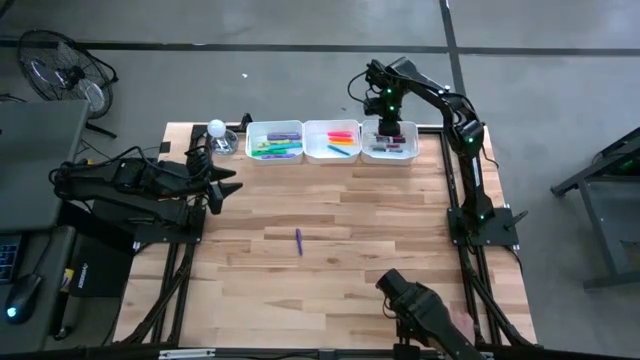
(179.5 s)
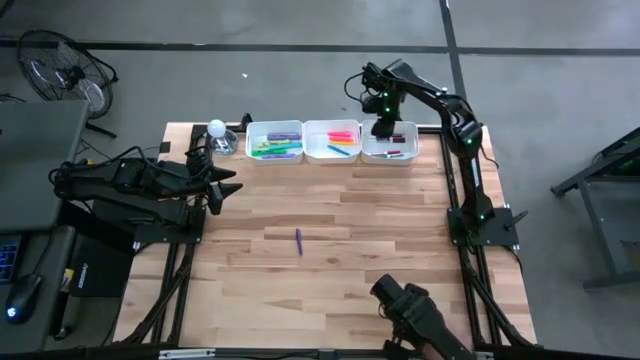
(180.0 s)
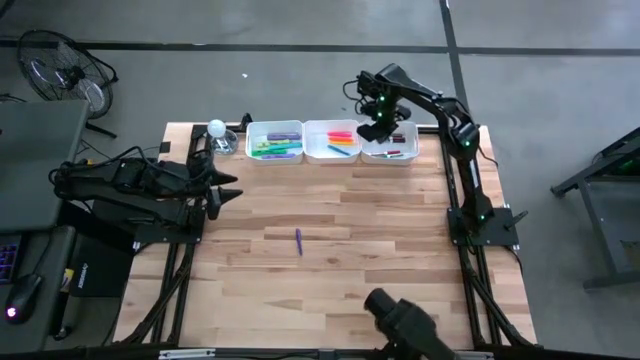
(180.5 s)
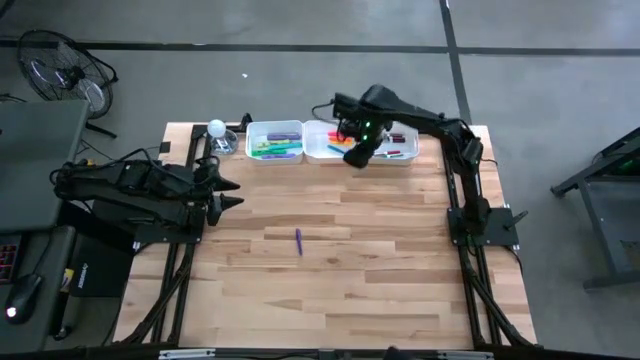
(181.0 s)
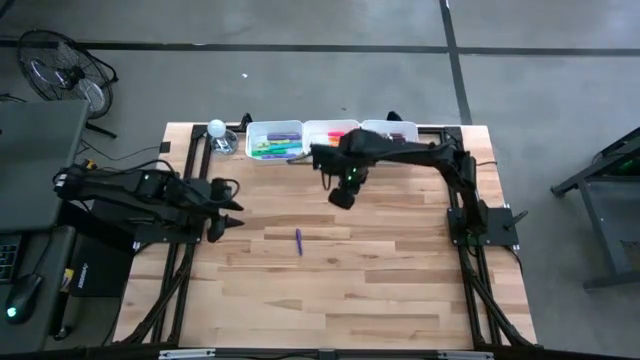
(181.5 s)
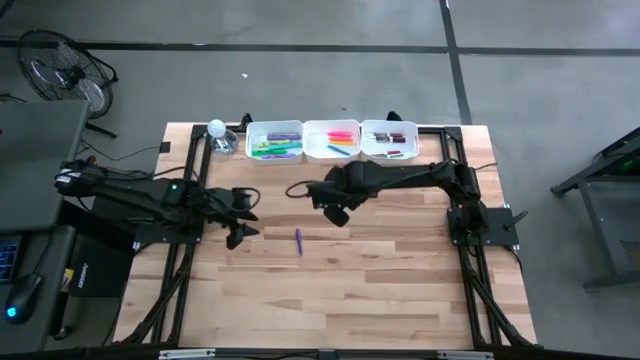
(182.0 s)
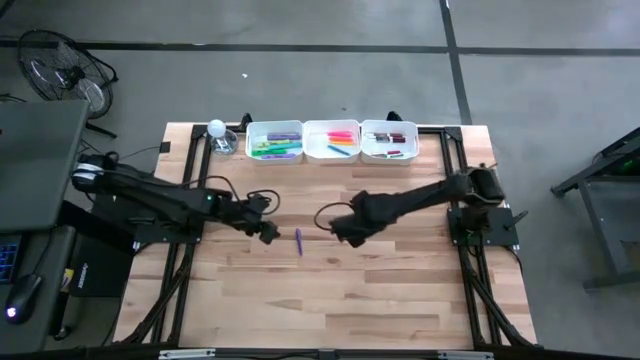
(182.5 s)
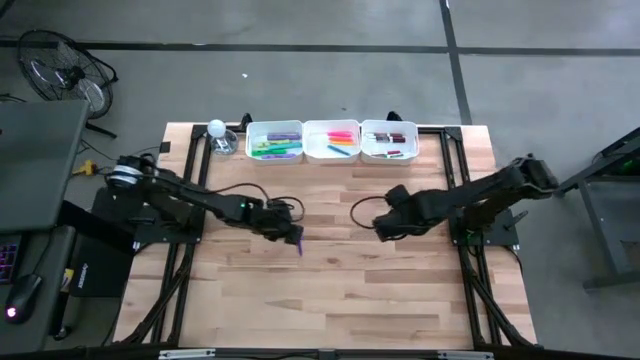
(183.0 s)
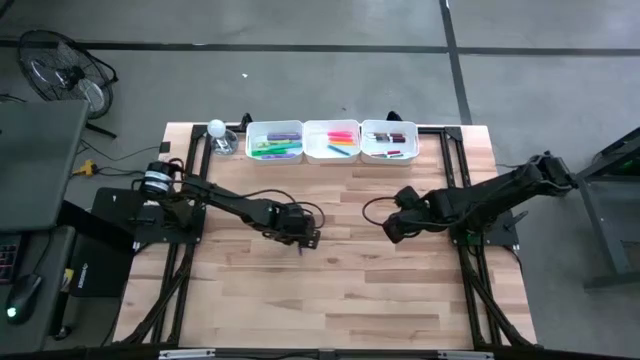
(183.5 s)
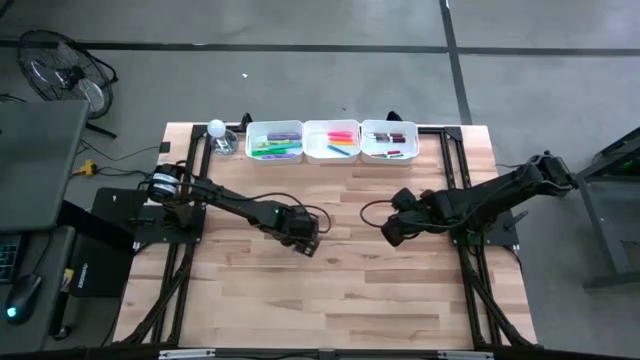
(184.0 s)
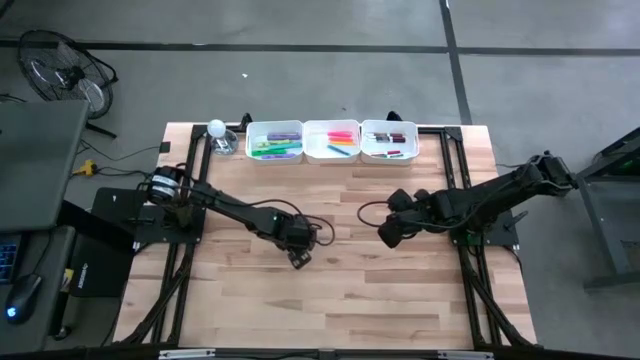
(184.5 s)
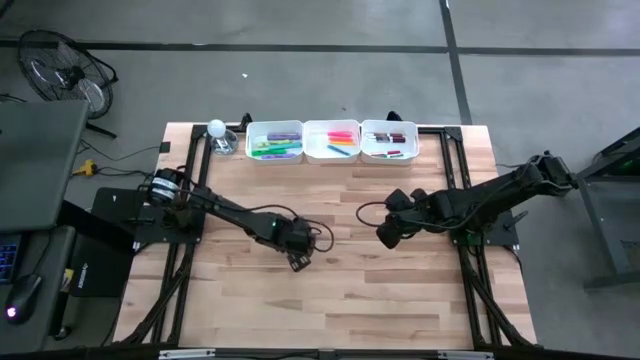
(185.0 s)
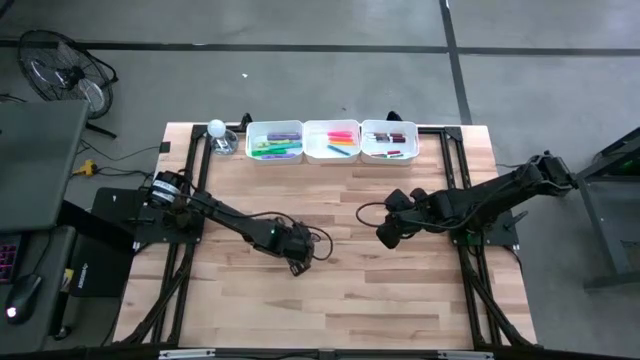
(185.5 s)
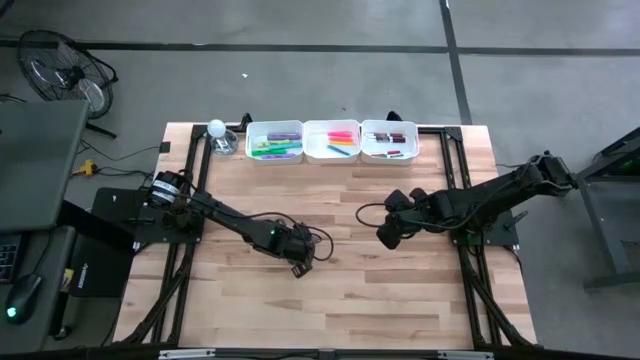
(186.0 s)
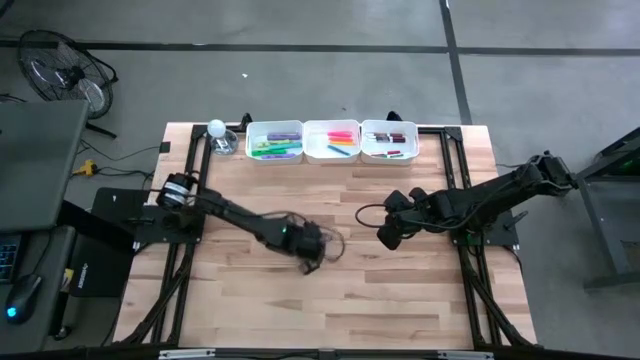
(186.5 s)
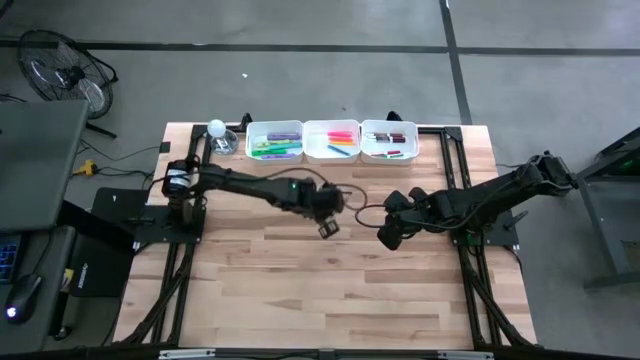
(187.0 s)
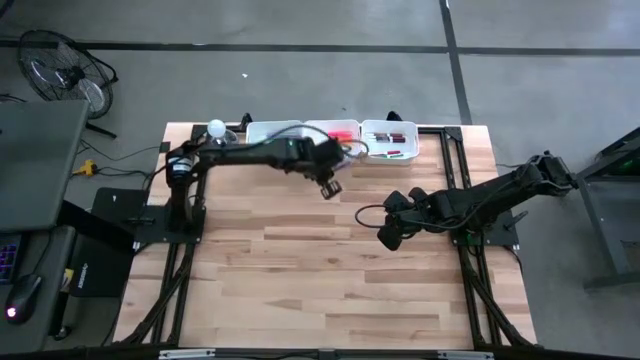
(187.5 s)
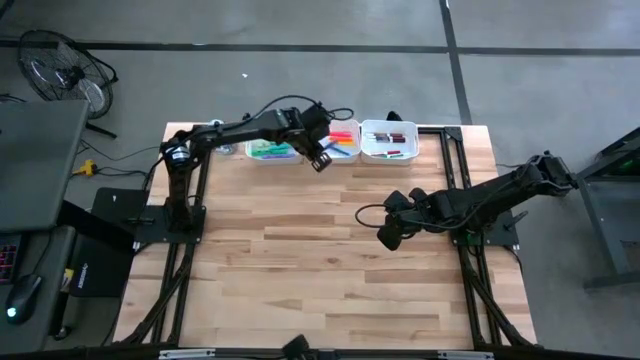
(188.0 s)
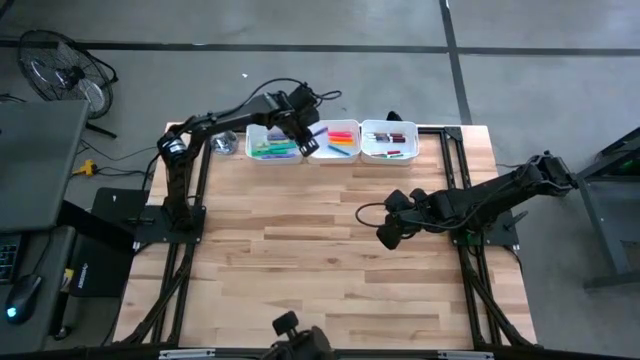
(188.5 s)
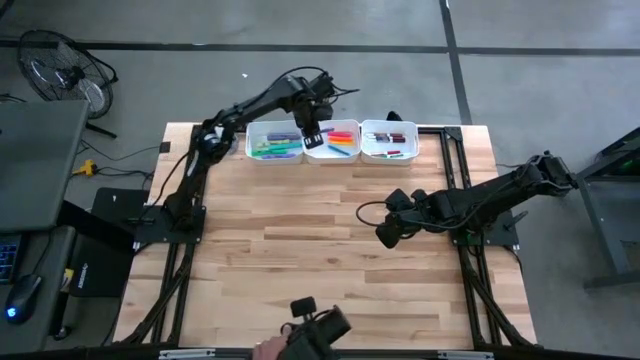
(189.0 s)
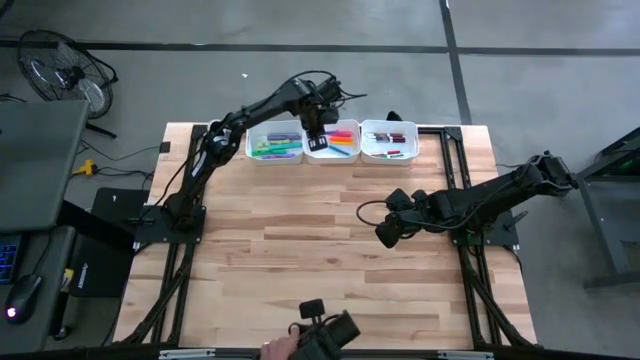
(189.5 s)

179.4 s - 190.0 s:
Task: Pick & Place Markers
Put the violet pen into the middle white bin

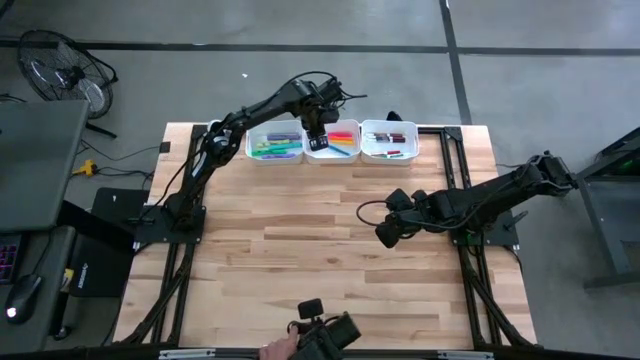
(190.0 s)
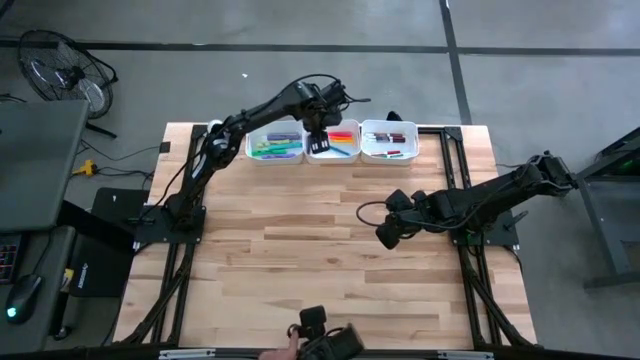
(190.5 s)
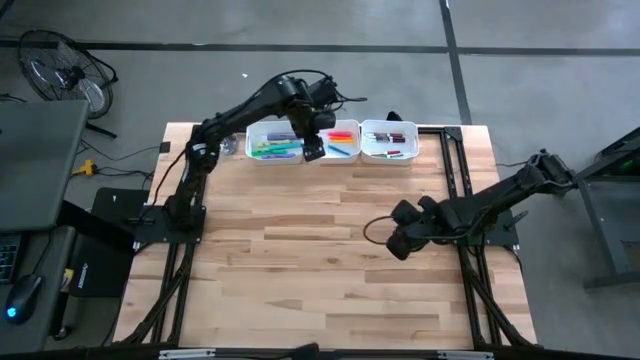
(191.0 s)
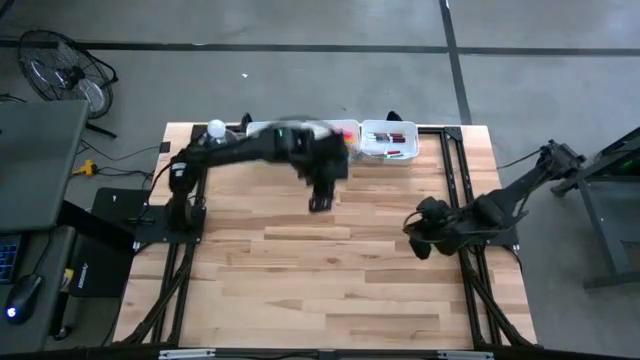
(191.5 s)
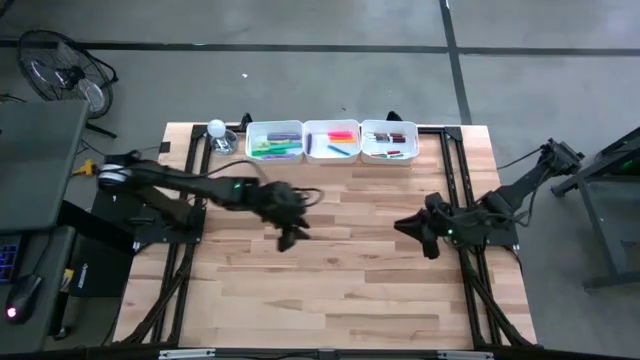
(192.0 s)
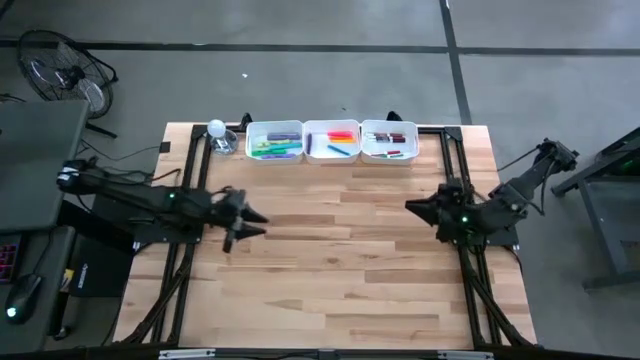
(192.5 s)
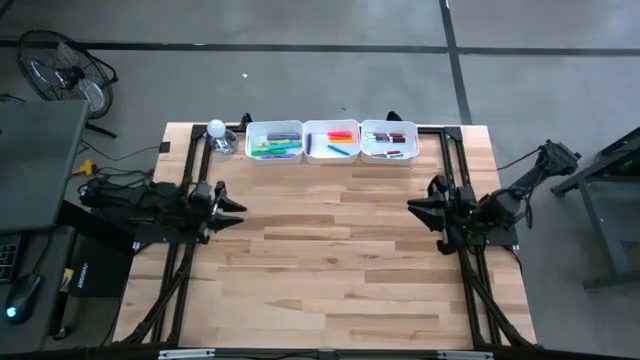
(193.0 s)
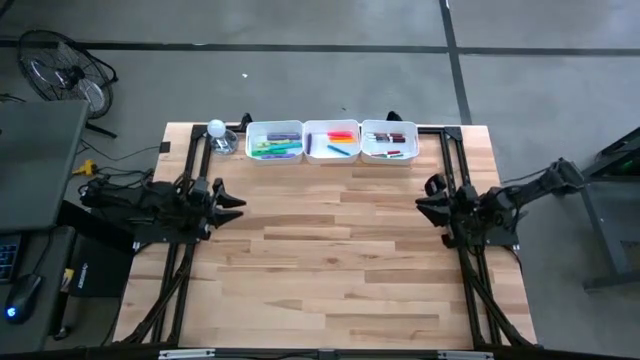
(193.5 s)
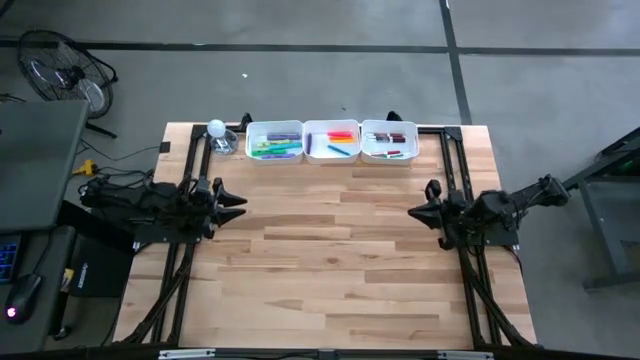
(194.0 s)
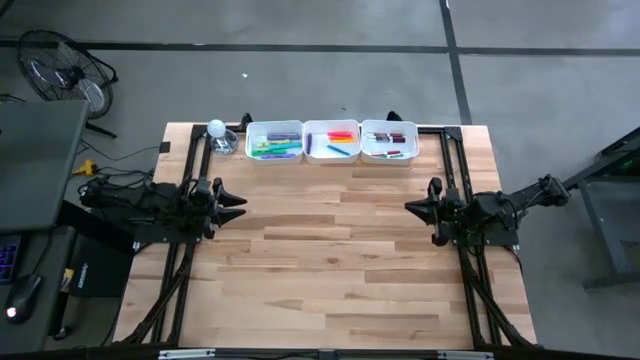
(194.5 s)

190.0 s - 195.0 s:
Return to Home Position

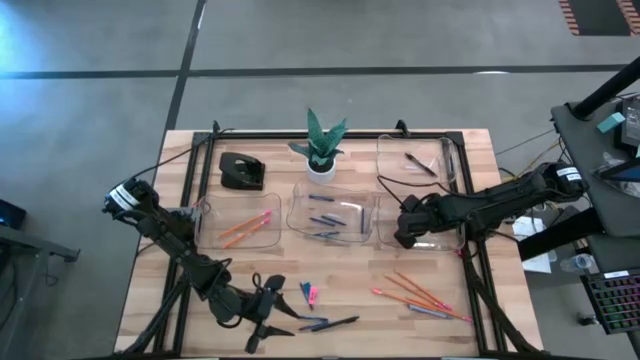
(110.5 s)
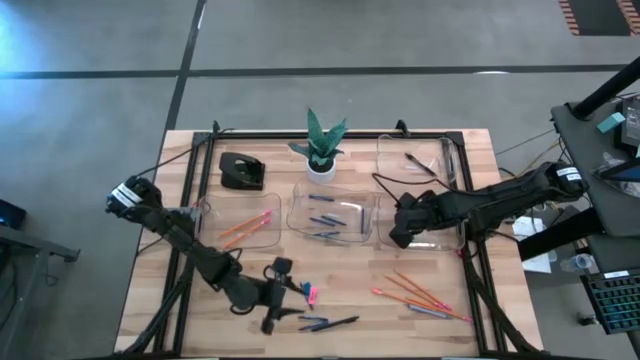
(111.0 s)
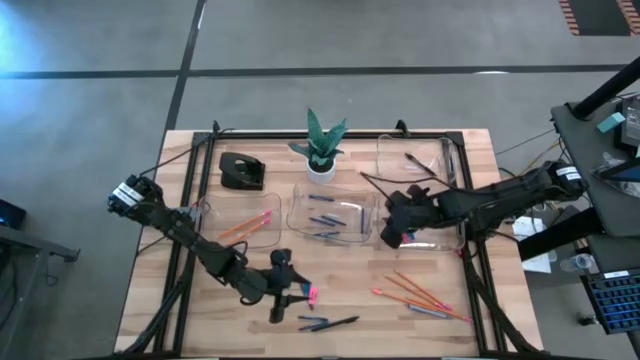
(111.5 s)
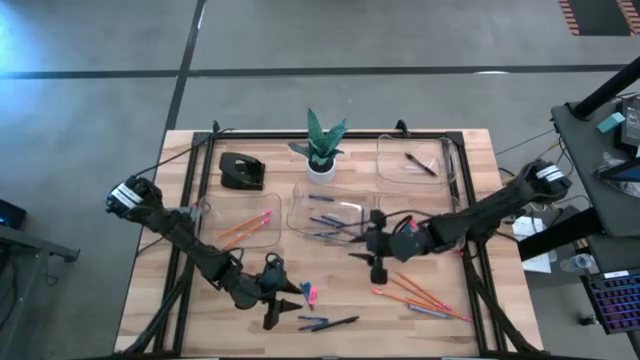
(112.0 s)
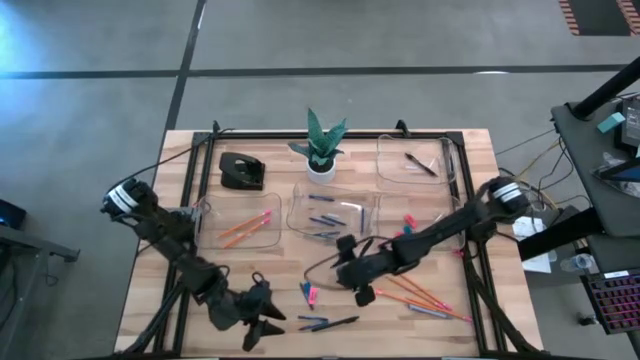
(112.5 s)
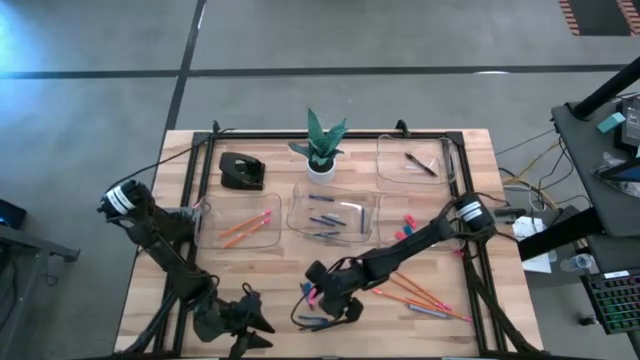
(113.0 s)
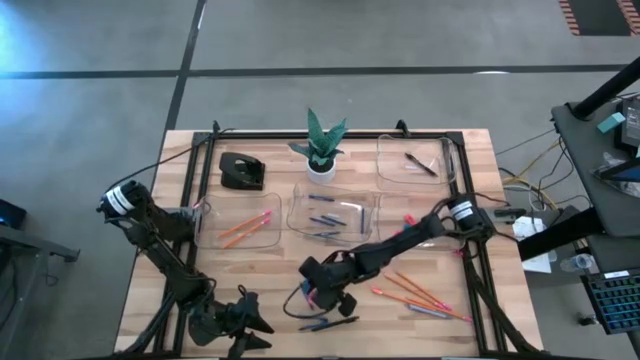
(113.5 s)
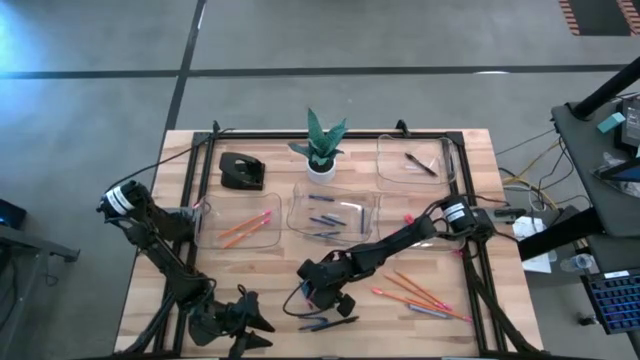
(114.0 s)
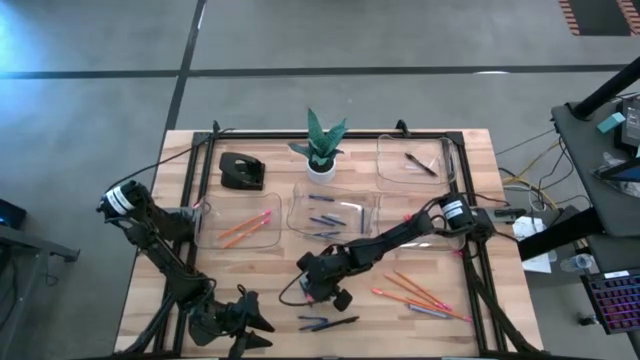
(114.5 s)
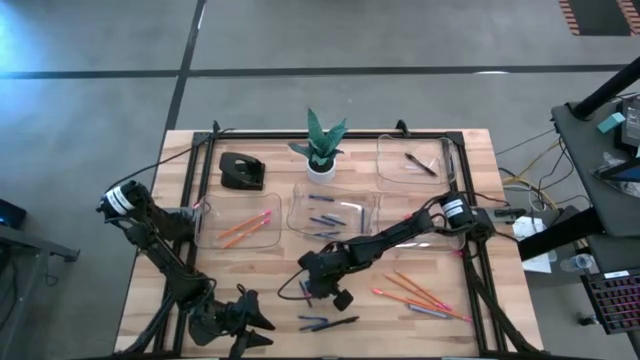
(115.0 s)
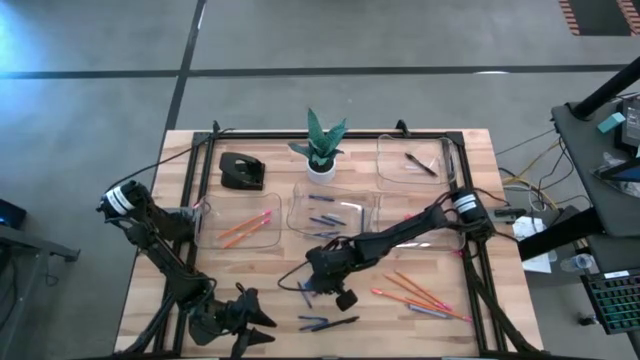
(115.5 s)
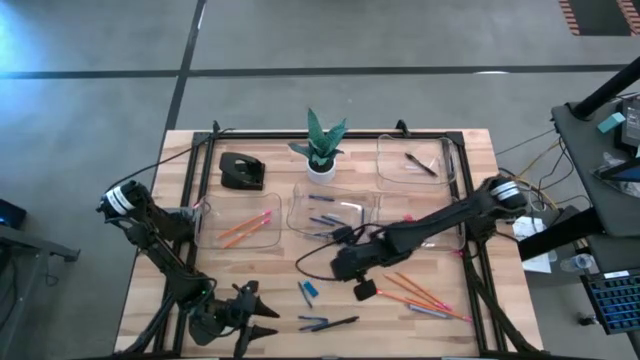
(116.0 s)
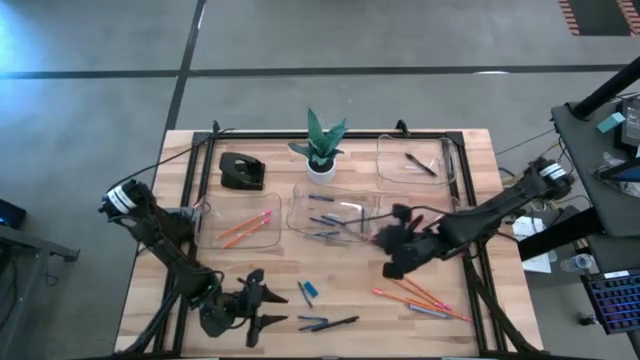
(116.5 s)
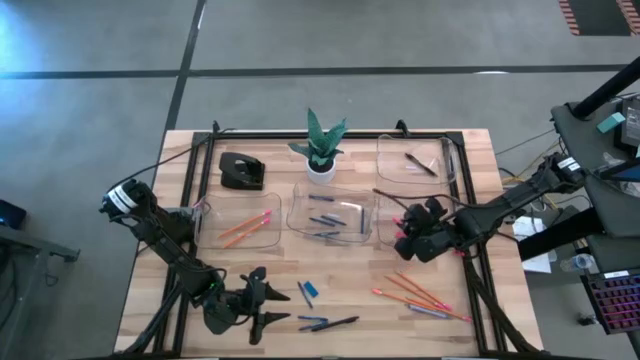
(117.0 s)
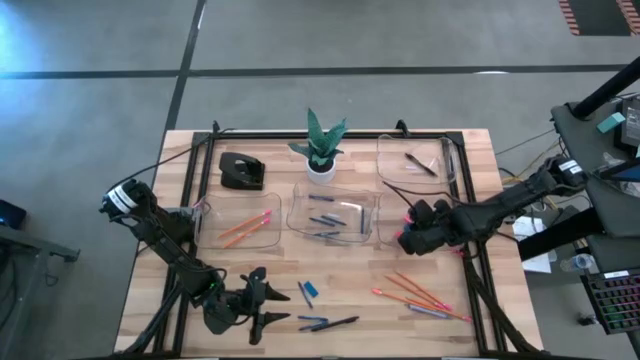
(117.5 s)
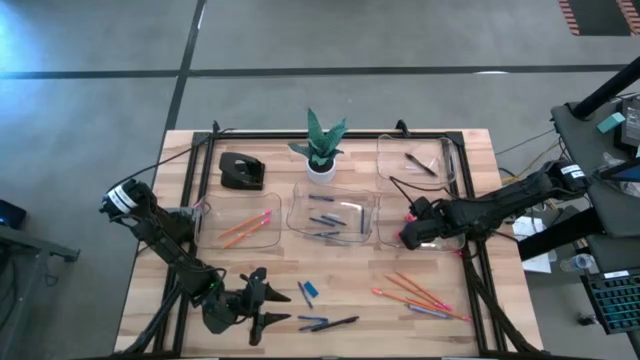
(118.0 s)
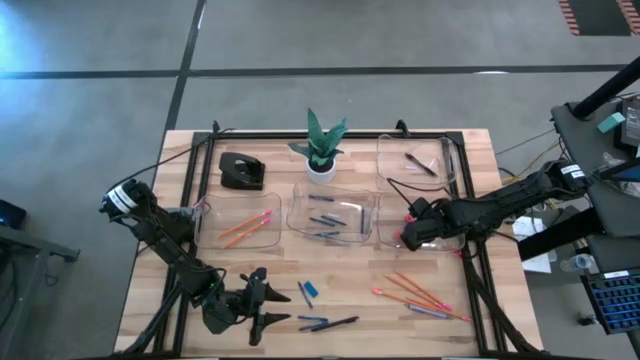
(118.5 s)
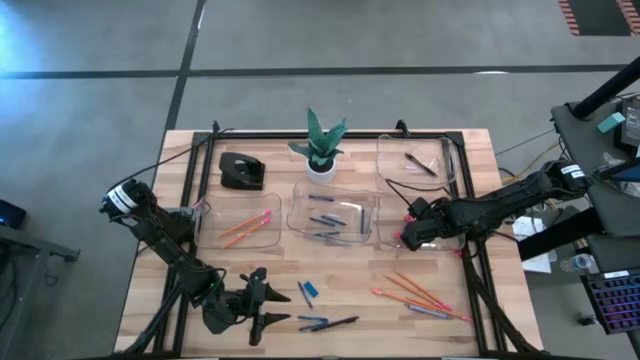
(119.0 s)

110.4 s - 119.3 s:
Task: Sort crayons/erasers/pens/pencils in bins
Put the pink eraser into the middle right transparent bin
